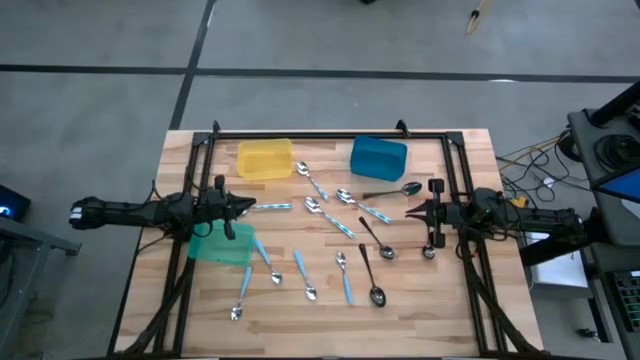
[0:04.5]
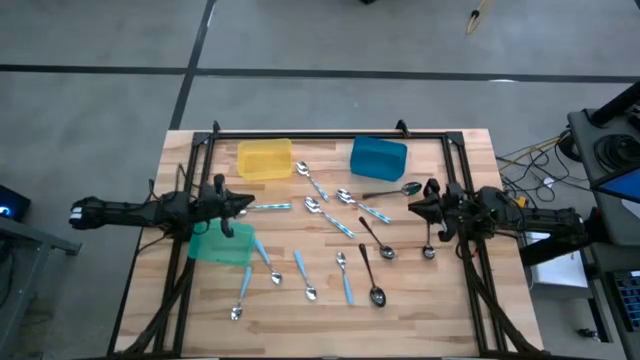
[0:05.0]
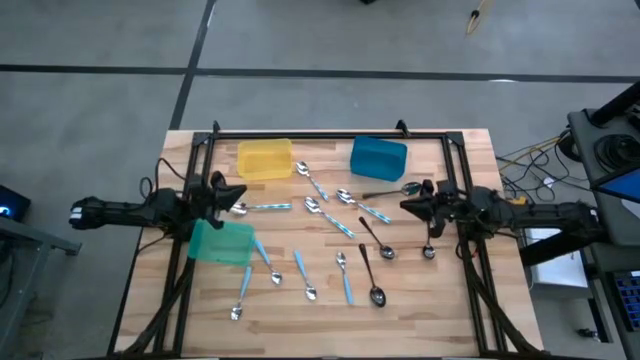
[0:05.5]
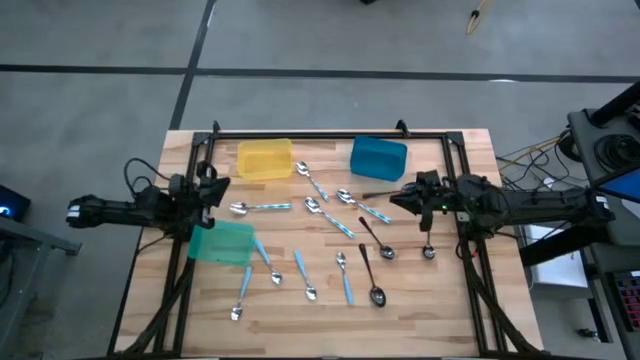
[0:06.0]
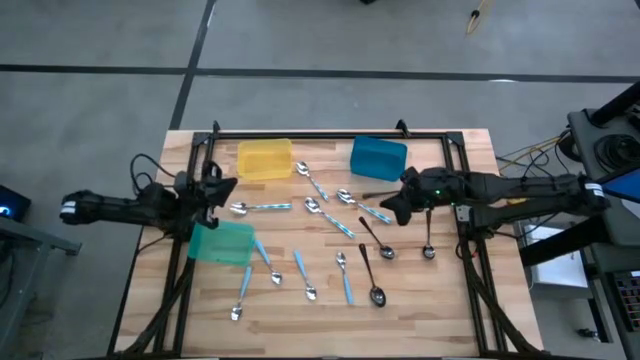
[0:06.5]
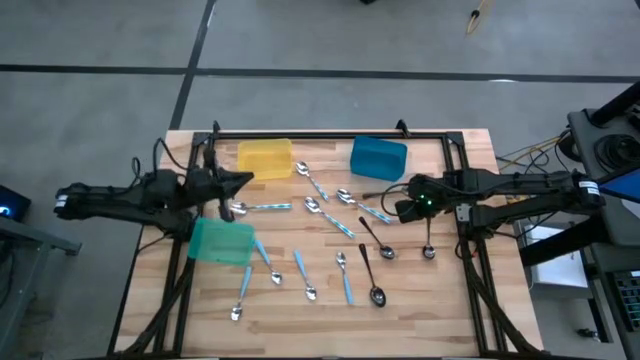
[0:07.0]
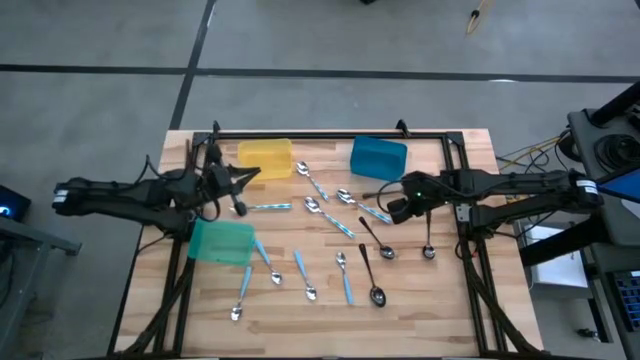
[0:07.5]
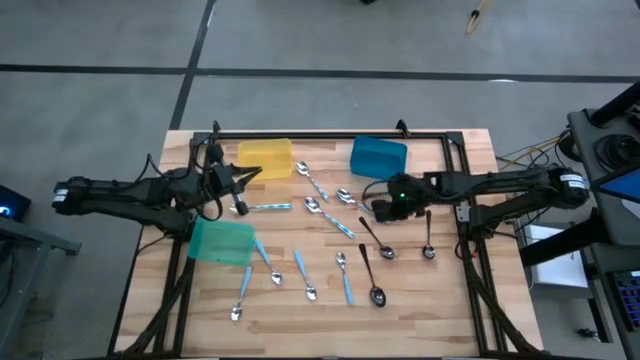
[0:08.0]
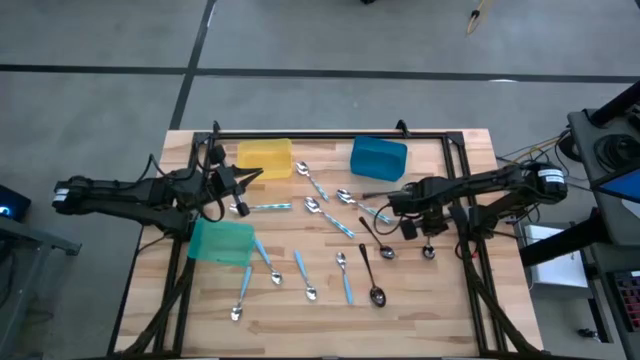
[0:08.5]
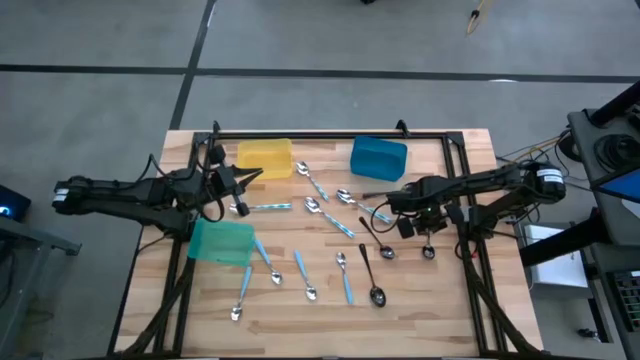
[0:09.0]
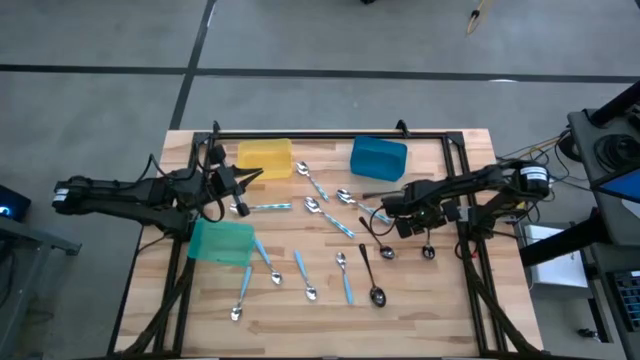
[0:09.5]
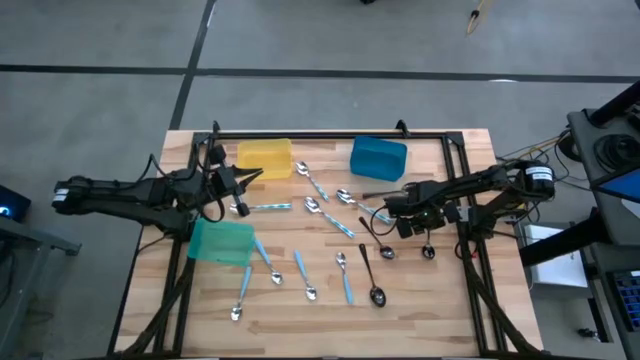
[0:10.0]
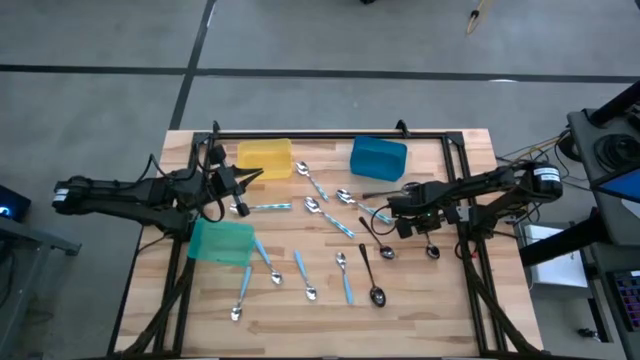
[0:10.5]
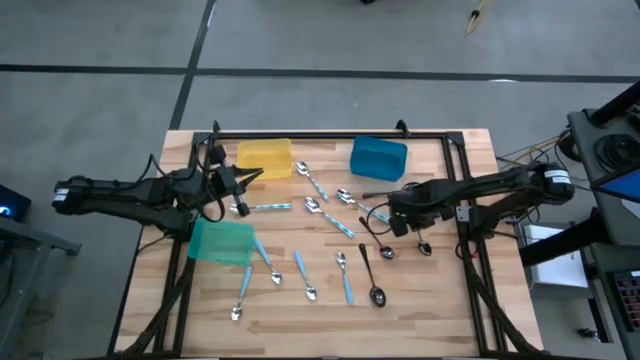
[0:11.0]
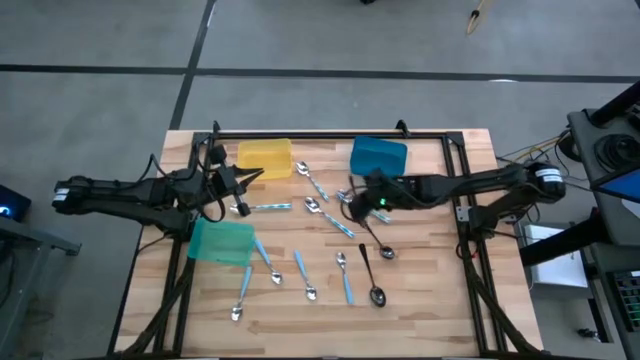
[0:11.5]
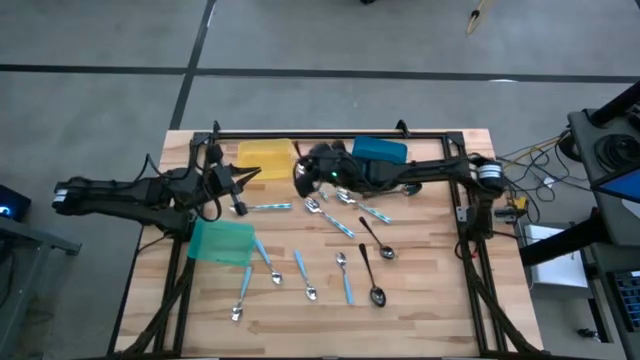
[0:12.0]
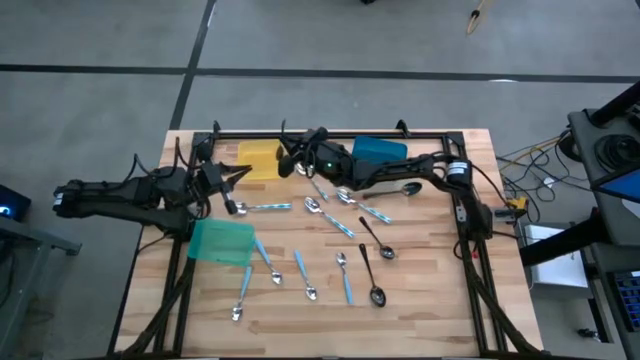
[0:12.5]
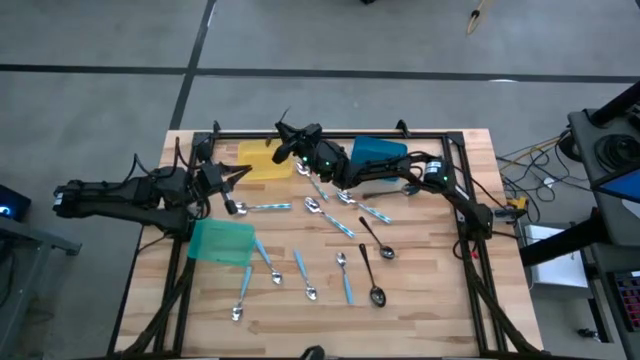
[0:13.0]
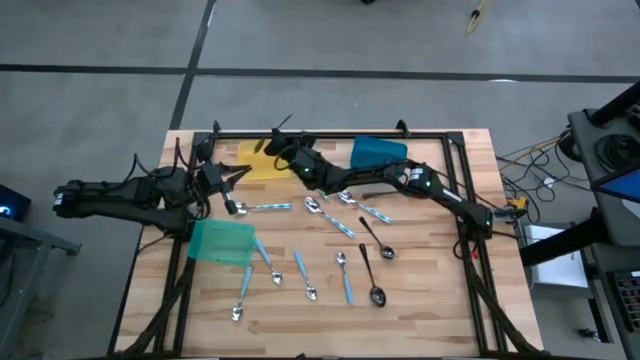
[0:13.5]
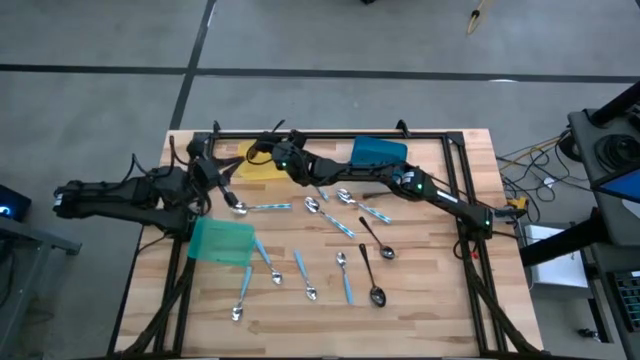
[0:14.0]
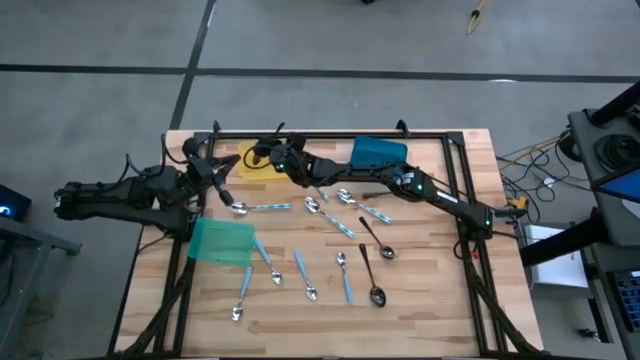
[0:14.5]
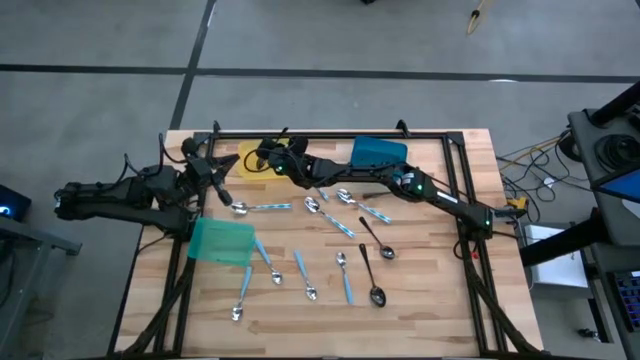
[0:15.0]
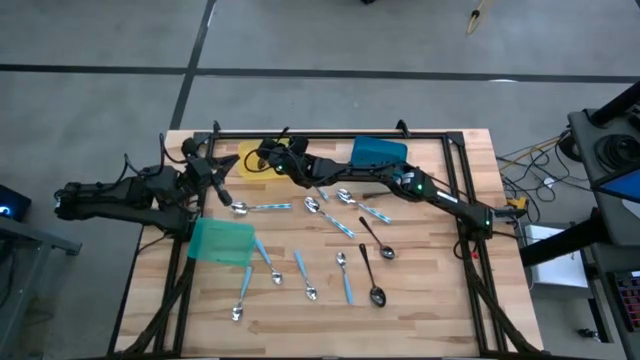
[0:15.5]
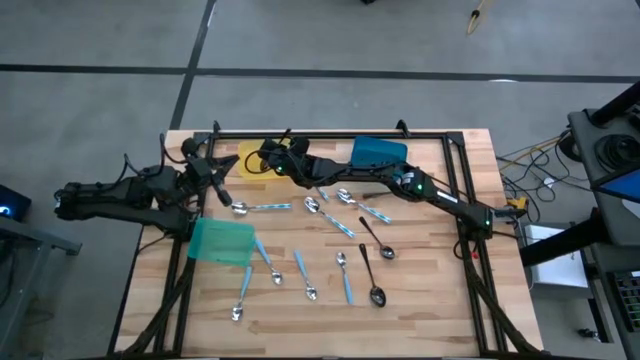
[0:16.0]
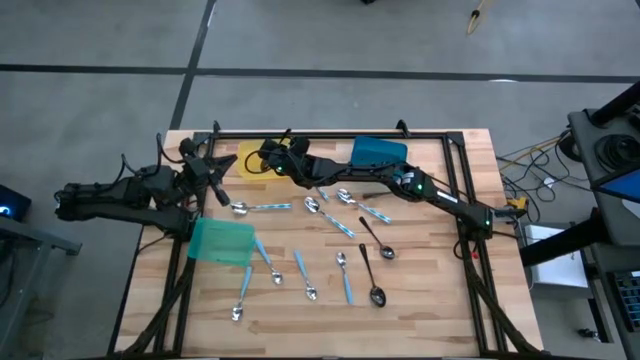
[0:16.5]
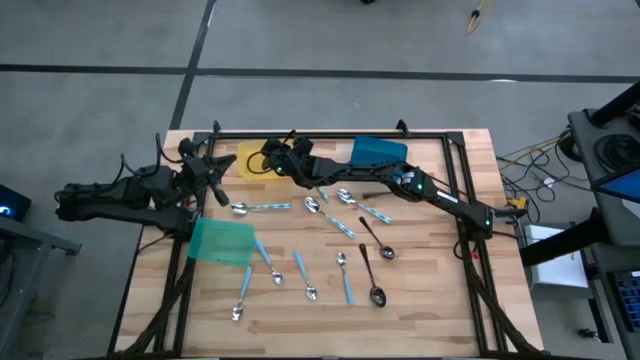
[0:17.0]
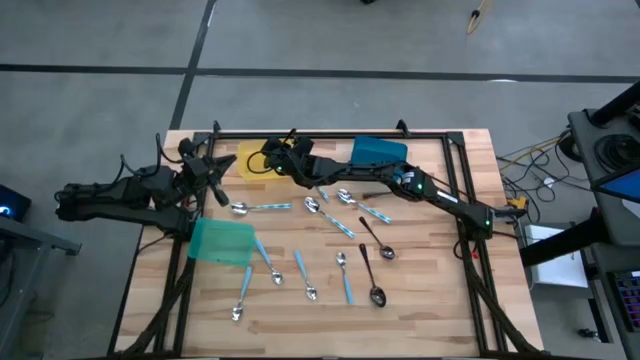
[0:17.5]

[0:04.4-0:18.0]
Task: Sort silverware by color (type)
Put the black spoon into the yellow bin

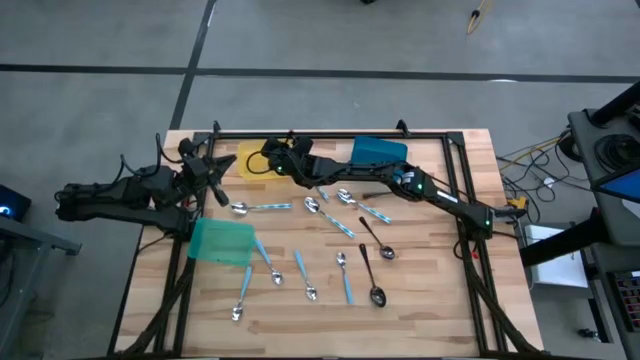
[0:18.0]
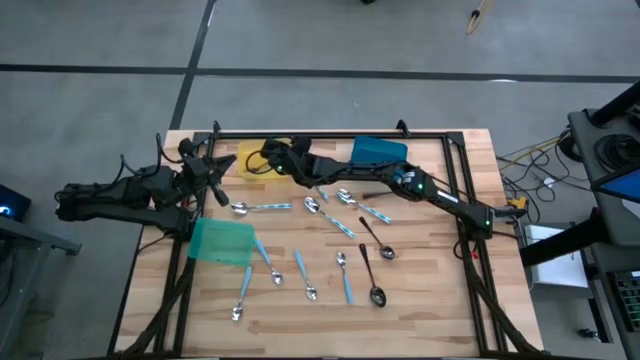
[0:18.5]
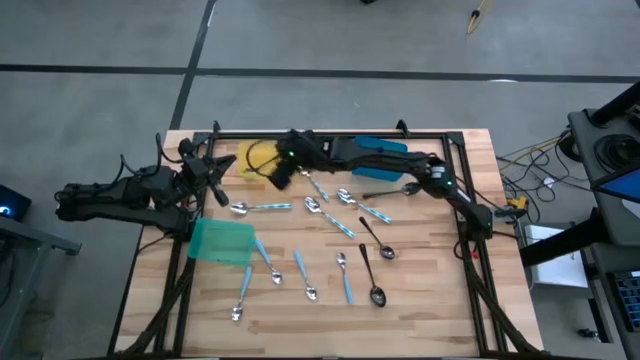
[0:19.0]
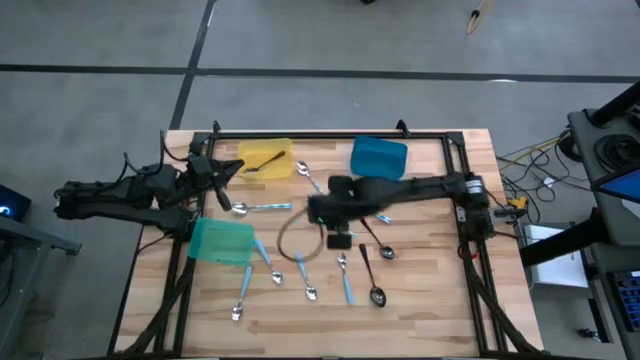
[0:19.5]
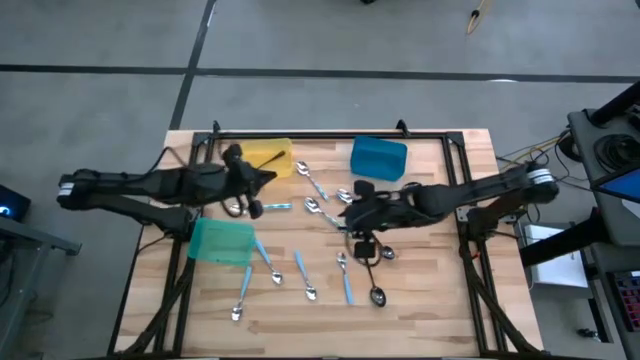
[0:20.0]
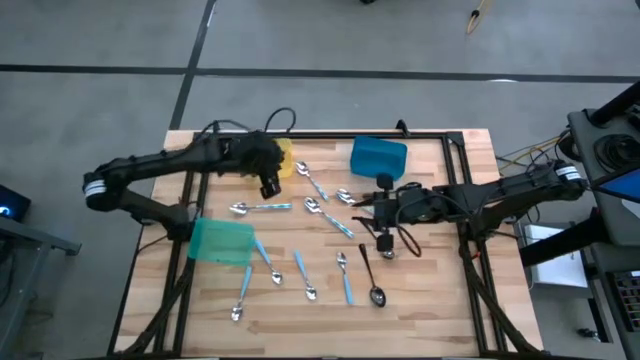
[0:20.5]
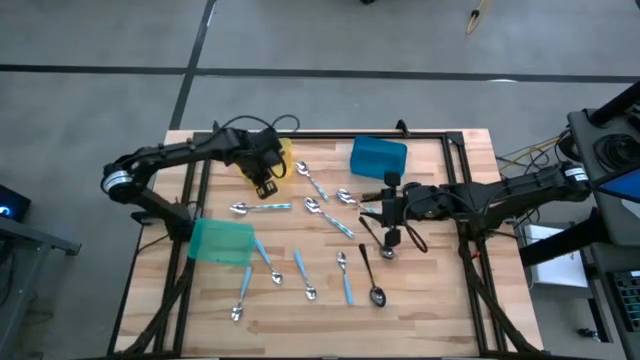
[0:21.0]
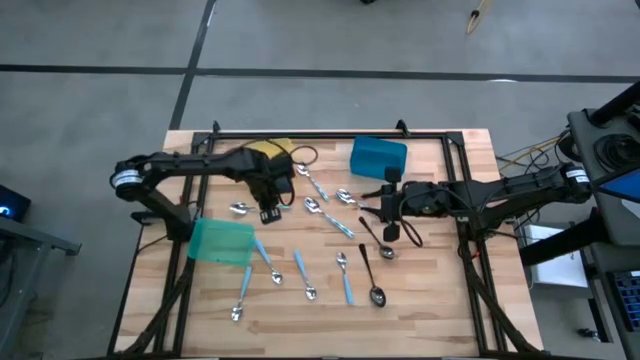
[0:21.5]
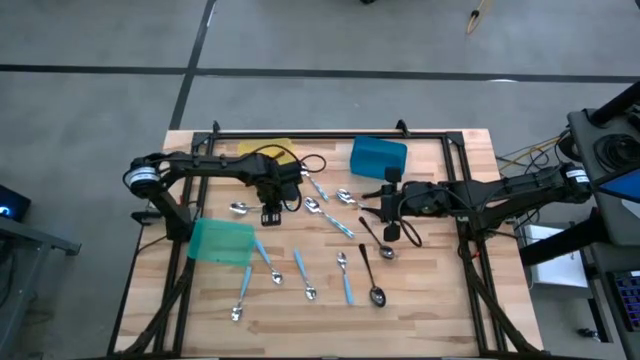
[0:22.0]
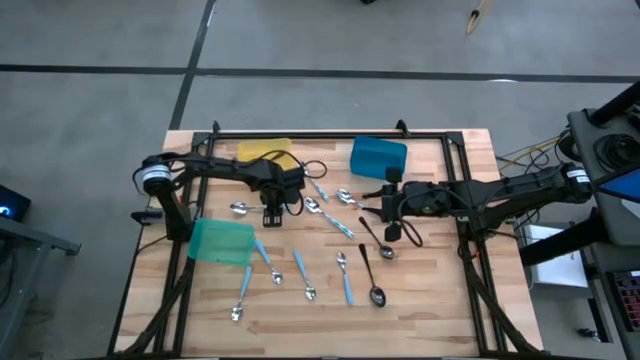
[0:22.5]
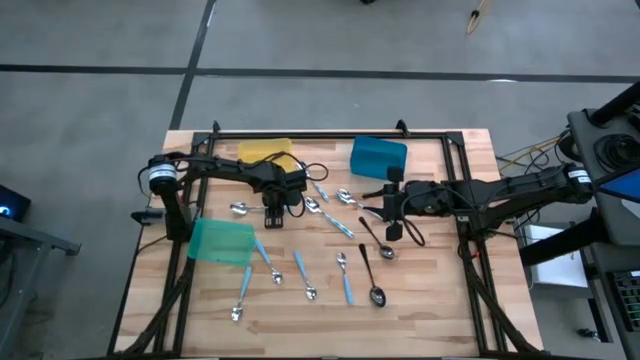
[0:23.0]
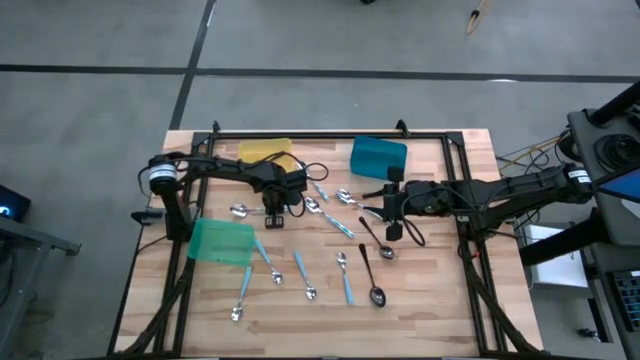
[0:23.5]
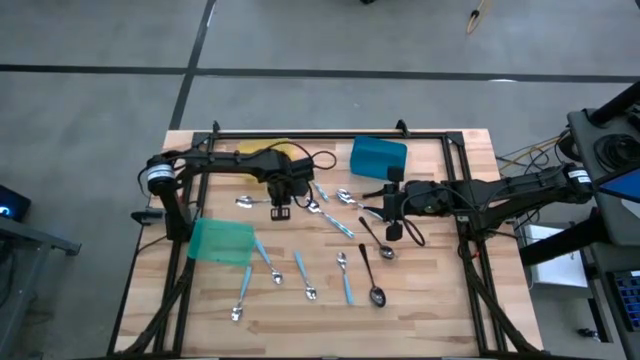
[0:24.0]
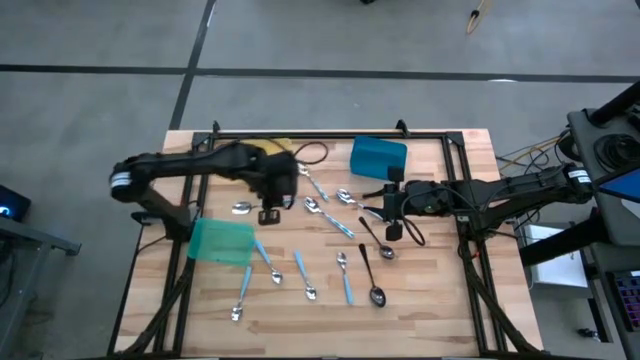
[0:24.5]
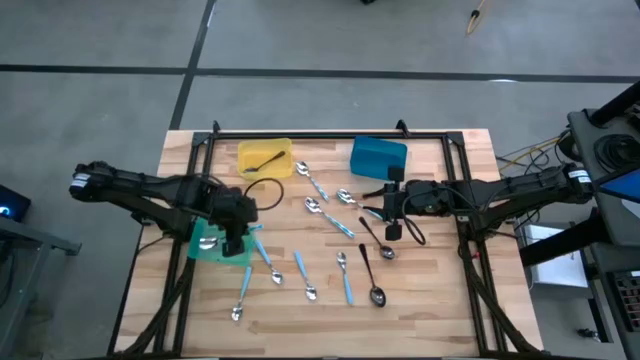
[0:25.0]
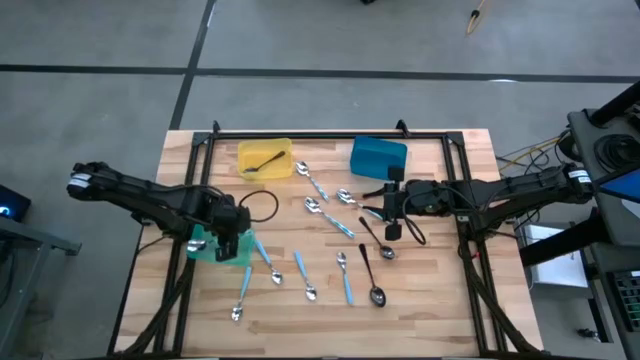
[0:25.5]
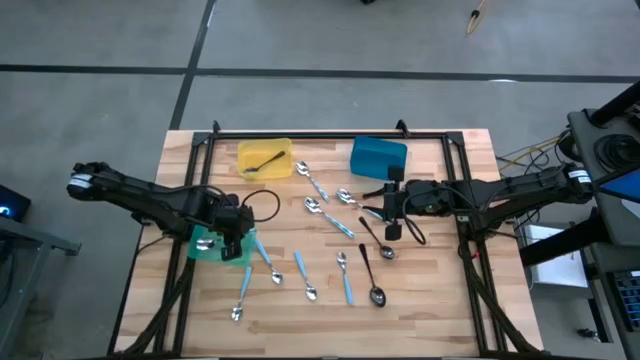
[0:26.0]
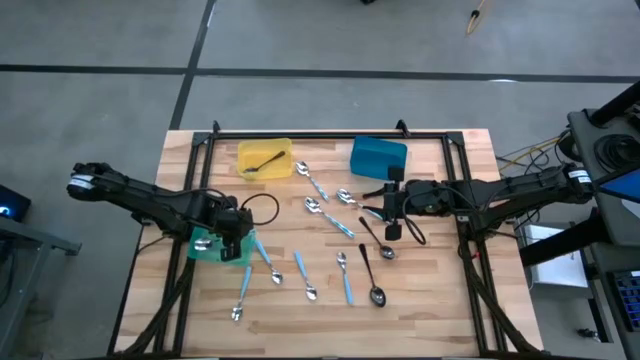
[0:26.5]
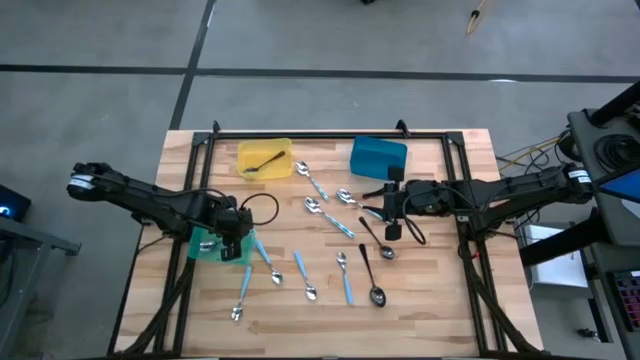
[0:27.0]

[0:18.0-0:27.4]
Put the blue patterned spoon into the green bin
